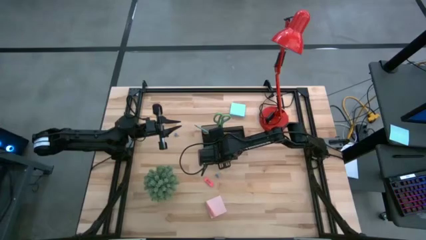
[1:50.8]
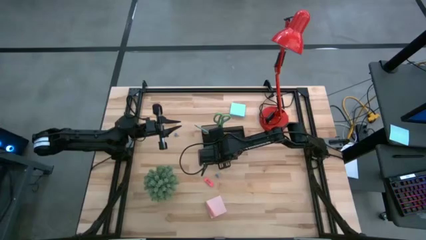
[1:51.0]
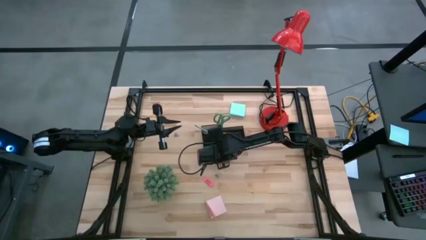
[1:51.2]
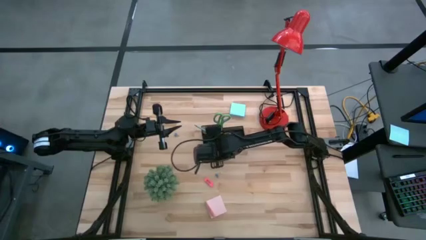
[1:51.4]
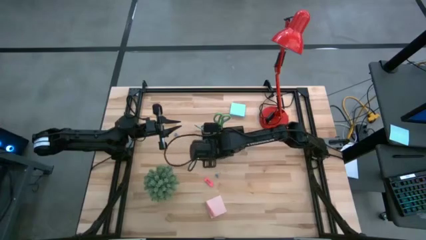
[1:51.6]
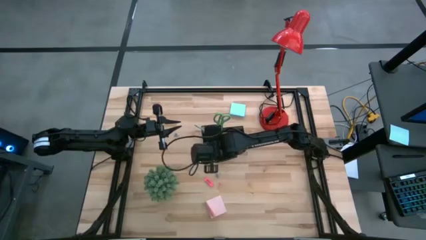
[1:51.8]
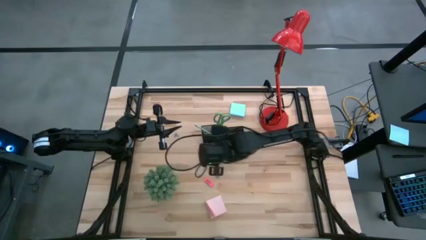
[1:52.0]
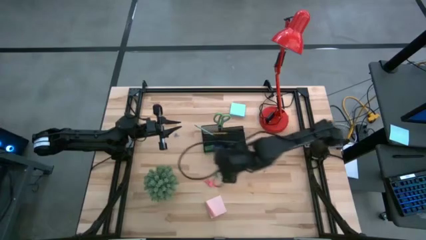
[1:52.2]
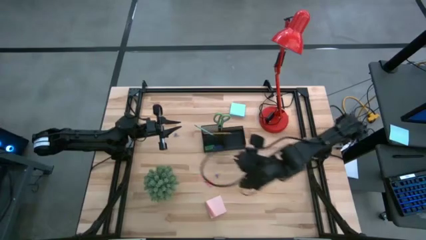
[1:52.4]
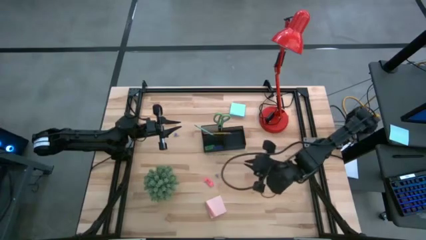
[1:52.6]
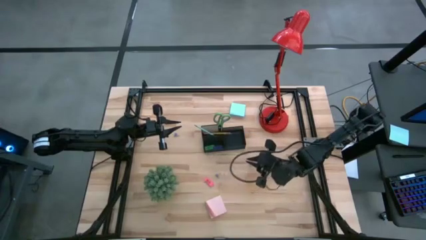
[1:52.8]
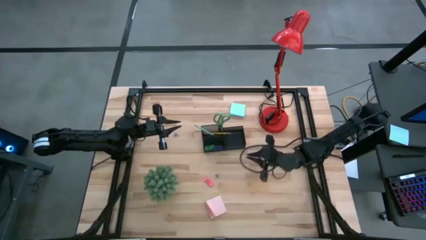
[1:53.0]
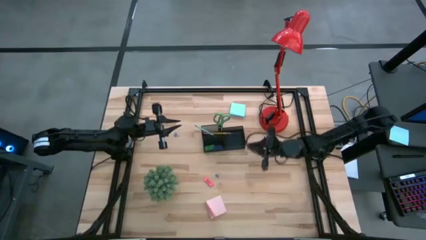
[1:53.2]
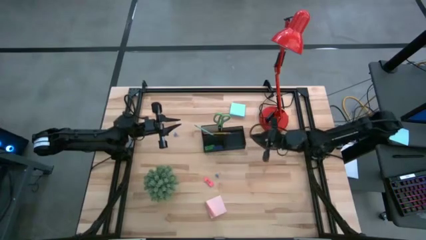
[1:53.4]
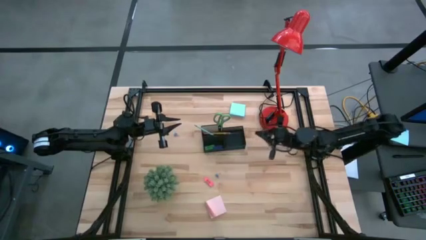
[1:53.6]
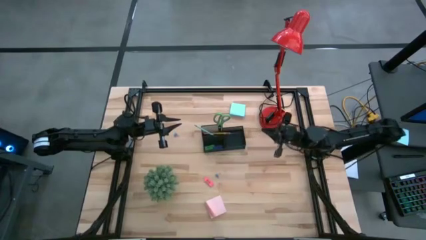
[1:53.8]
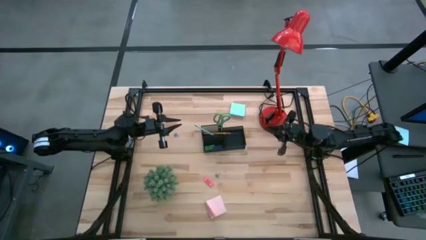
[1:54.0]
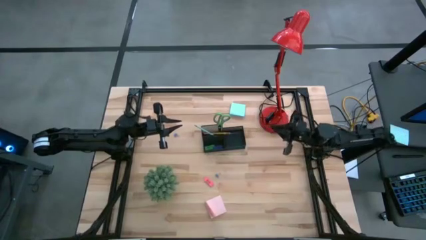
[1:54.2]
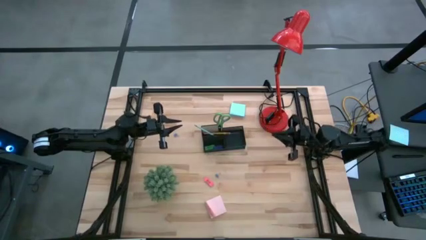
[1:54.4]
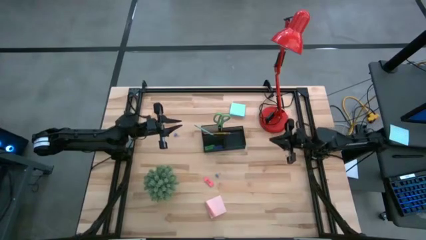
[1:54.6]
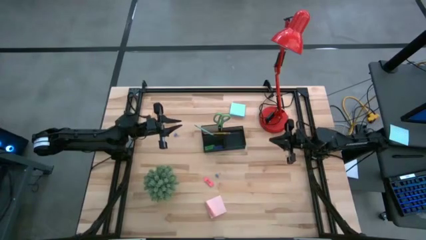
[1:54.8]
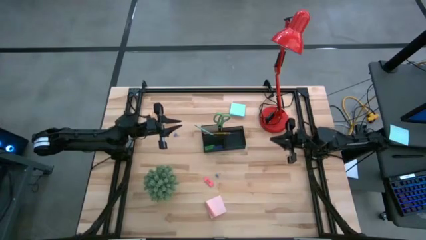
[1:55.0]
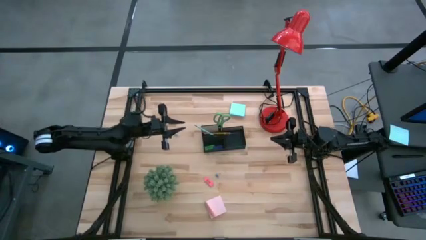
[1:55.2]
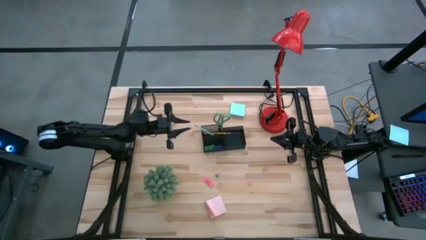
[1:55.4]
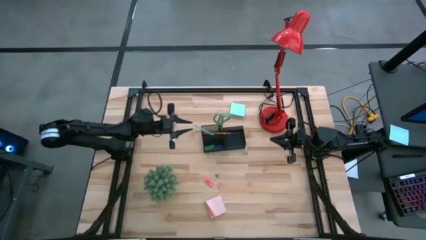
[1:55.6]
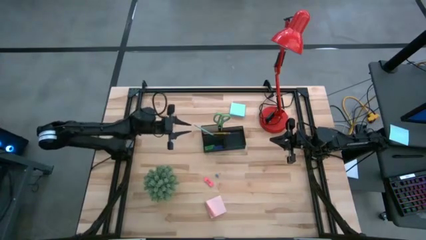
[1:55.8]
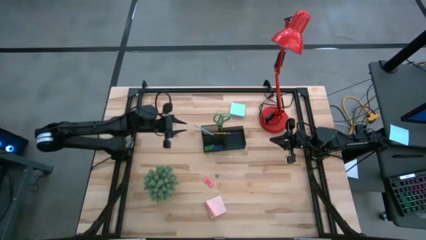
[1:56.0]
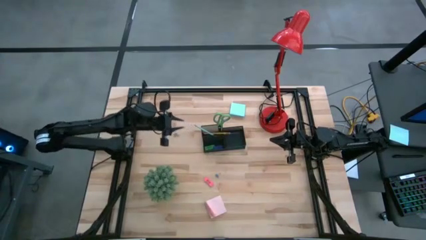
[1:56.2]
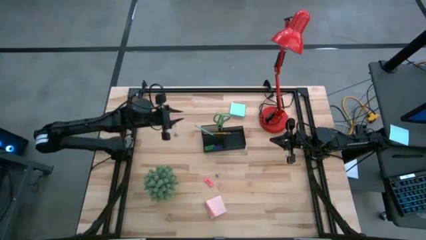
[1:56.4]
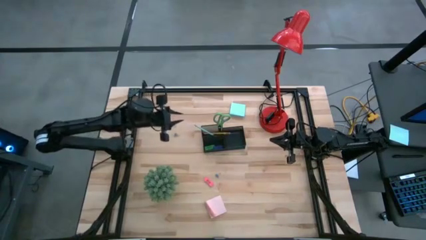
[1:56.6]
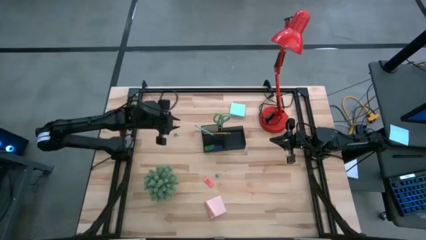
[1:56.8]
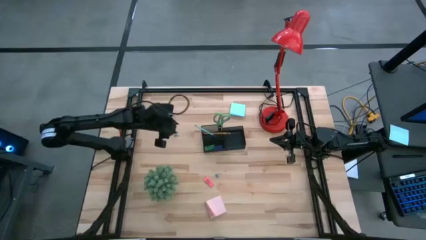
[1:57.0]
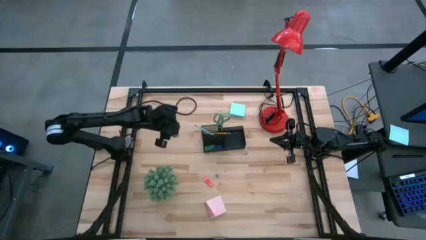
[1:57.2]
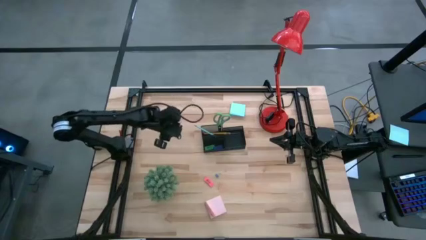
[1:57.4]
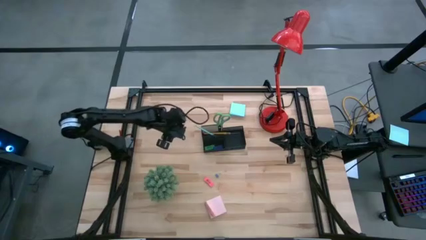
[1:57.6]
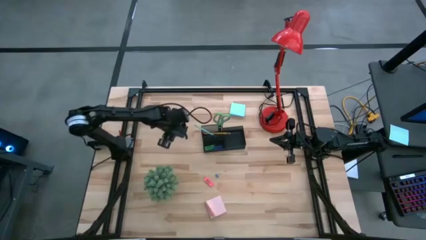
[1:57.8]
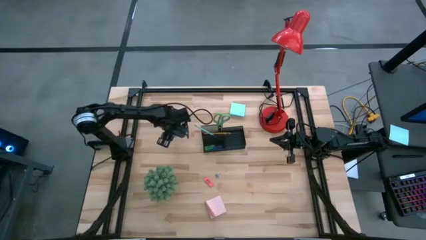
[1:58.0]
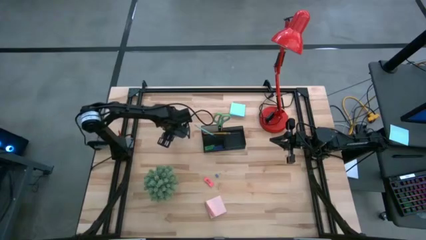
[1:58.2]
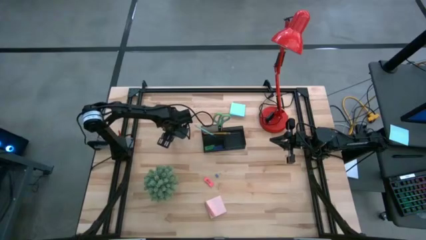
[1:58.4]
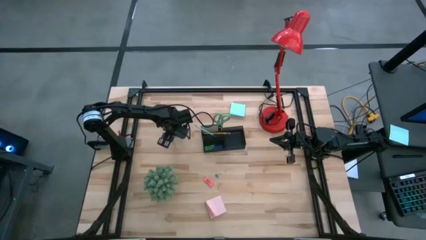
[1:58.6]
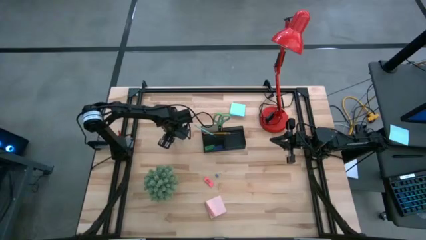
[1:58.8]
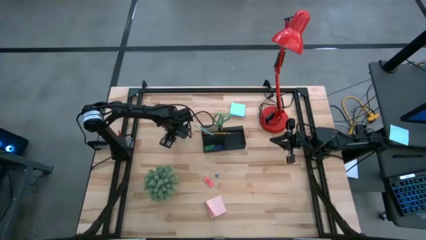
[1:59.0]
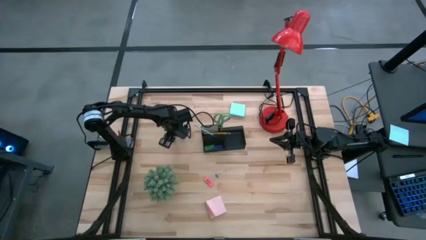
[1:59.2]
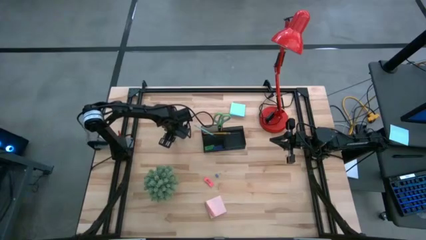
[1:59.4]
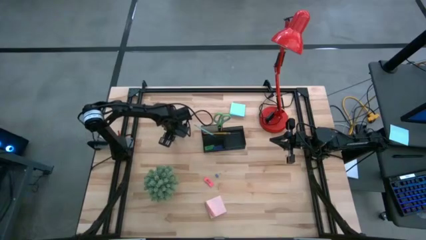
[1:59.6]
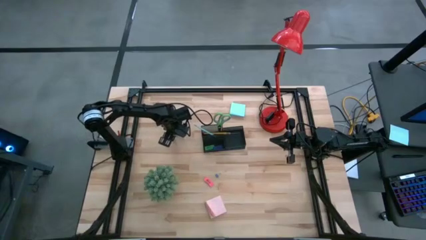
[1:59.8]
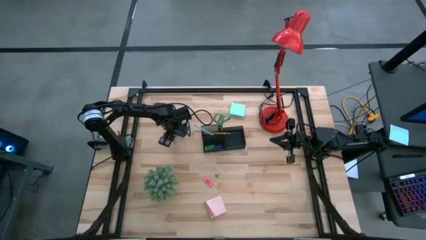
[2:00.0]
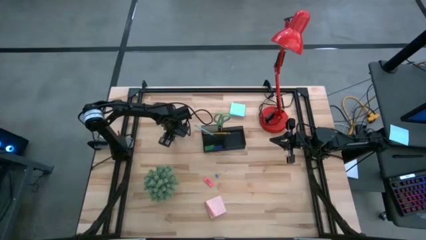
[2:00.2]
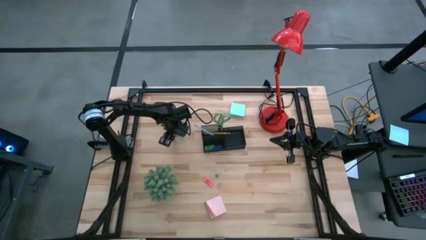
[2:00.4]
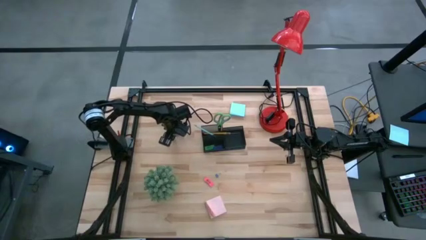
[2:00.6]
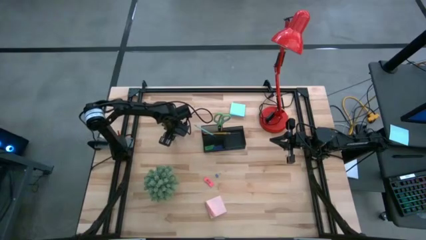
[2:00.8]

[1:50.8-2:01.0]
Task: Pick and place office supplies into organizer
Put the top blue binder clip into the black desk organizer

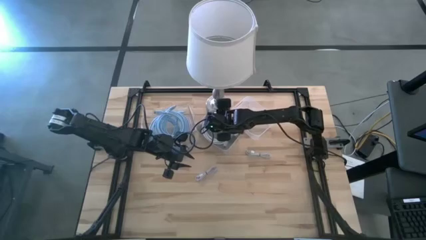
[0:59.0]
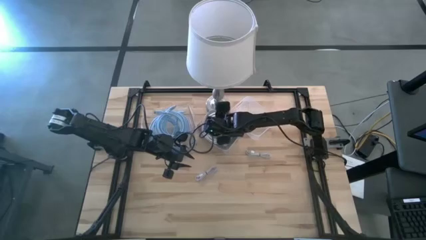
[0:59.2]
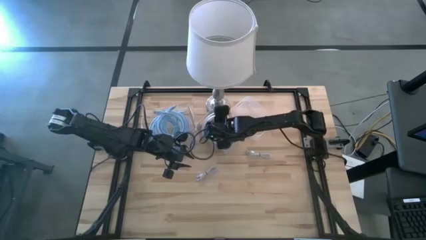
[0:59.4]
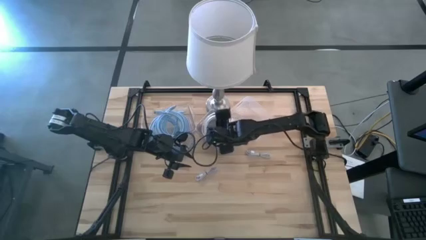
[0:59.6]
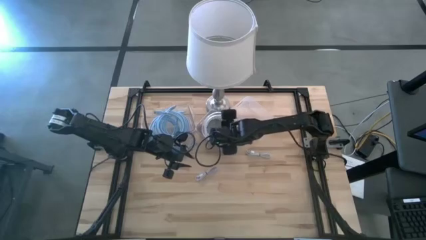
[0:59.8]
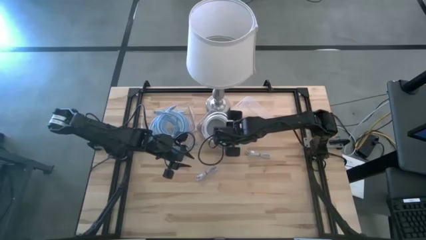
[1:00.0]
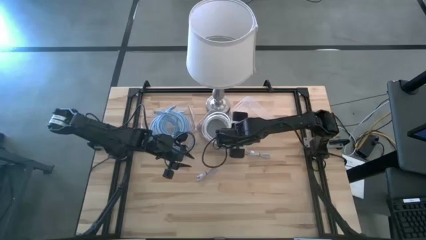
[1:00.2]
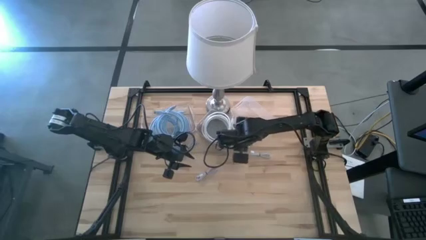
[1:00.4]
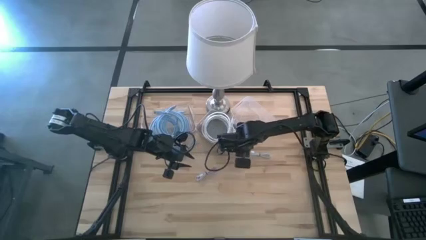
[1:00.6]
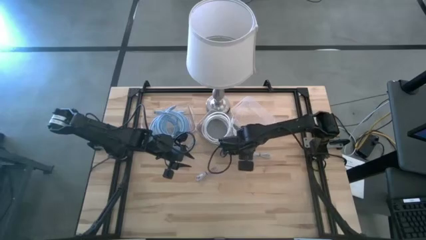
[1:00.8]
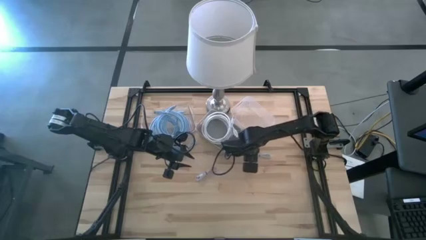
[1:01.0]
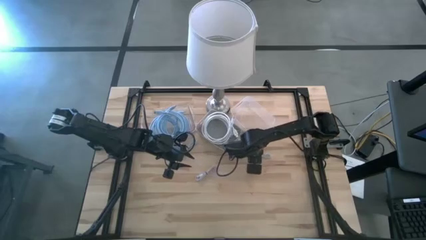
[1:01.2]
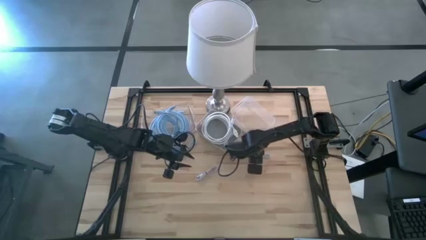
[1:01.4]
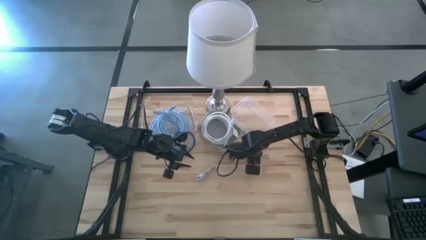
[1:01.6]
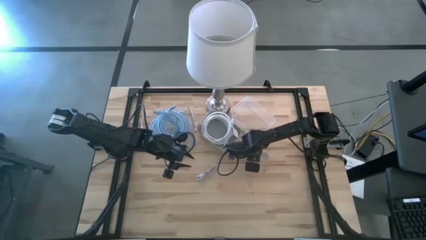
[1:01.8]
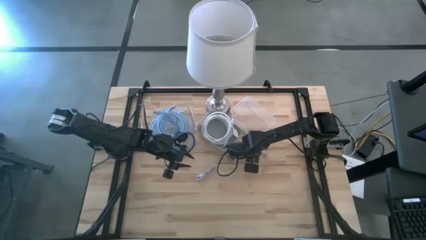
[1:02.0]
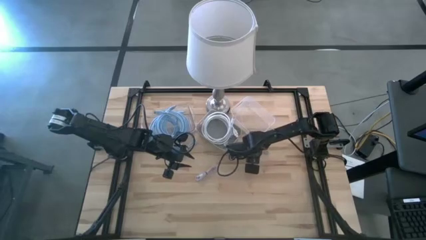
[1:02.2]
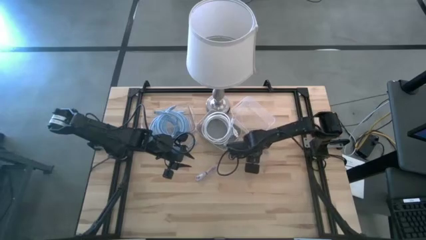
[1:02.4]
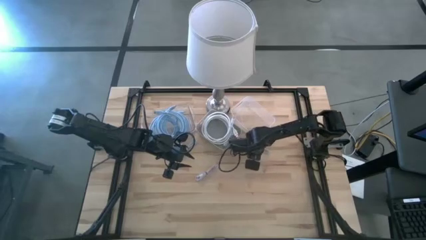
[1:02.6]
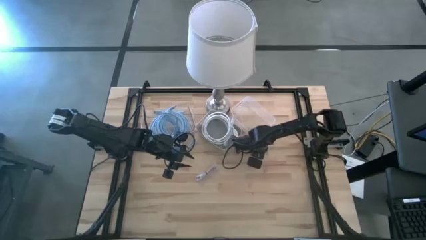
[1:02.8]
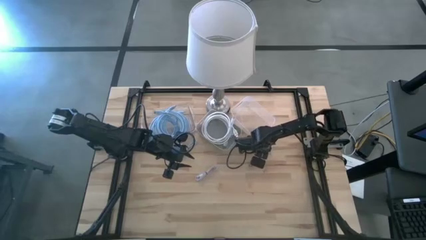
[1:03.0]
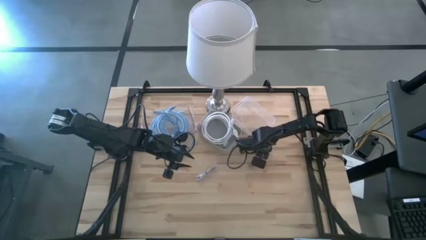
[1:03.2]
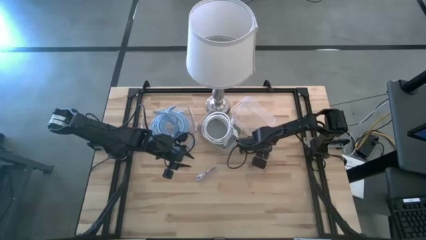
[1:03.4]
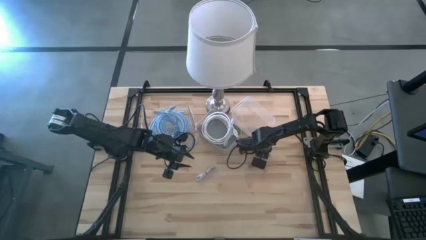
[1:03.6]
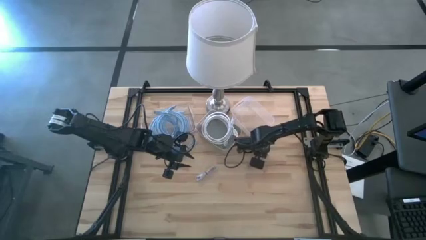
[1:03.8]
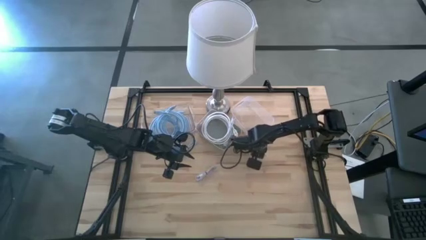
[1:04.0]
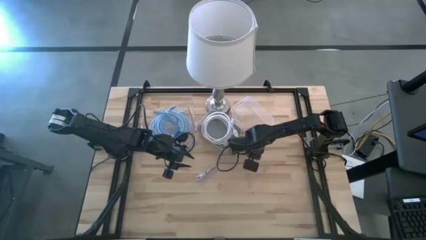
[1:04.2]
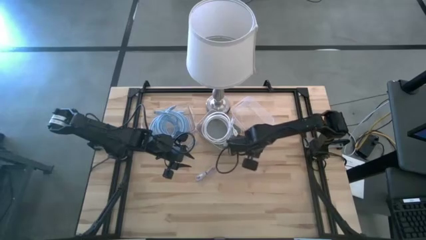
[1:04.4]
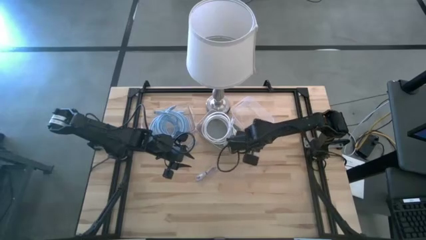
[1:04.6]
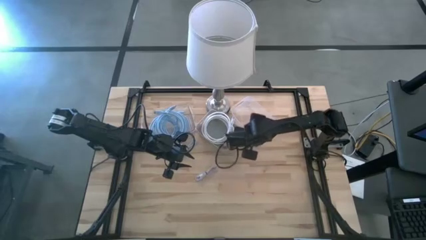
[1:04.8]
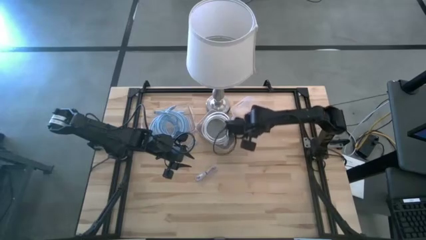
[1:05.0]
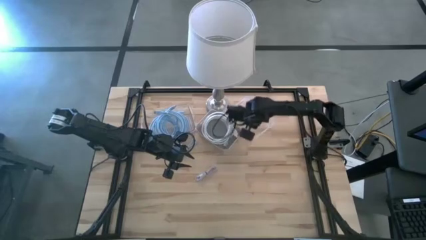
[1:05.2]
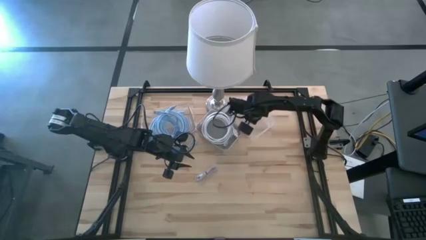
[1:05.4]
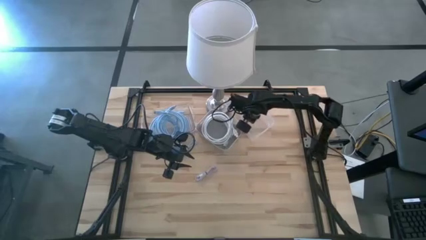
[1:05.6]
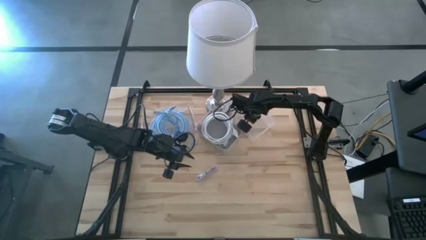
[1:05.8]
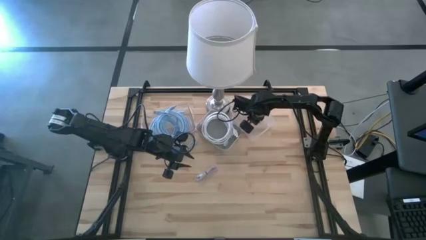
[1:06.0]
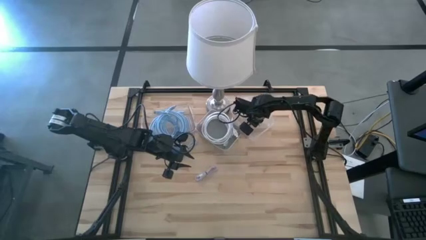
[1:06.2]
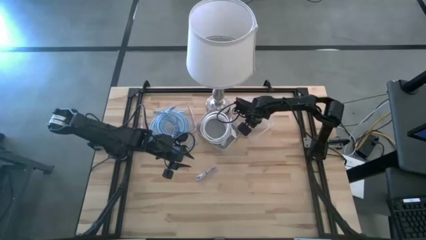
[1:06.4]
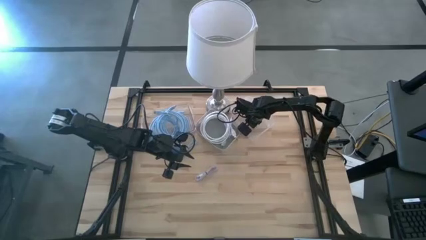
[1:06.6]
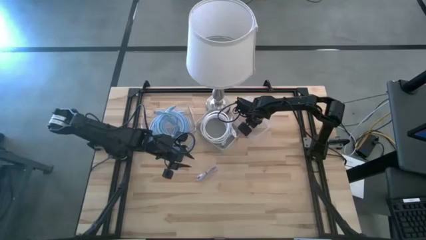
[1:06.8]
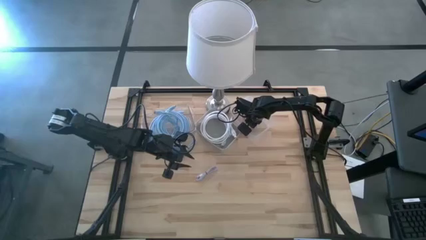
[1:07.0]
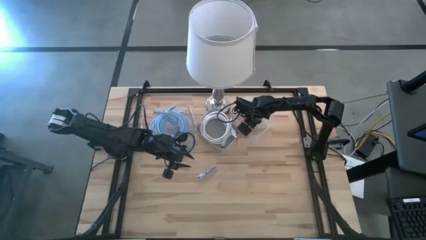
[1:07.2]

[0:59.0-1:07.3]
Task: Pick & Place USB Port
Put the white USB cable into the right transparent bin
